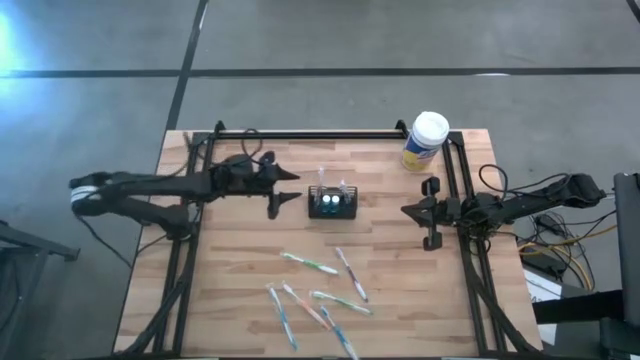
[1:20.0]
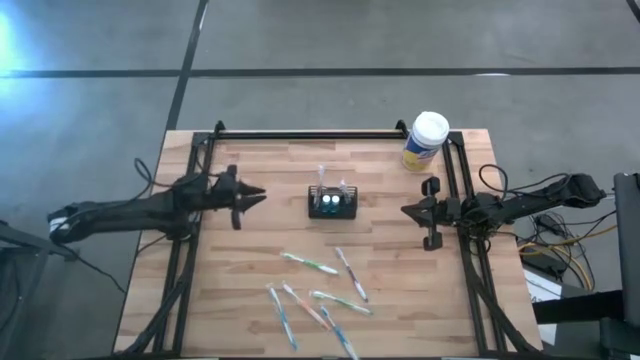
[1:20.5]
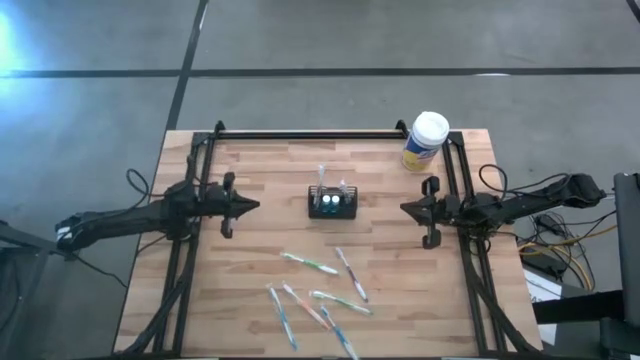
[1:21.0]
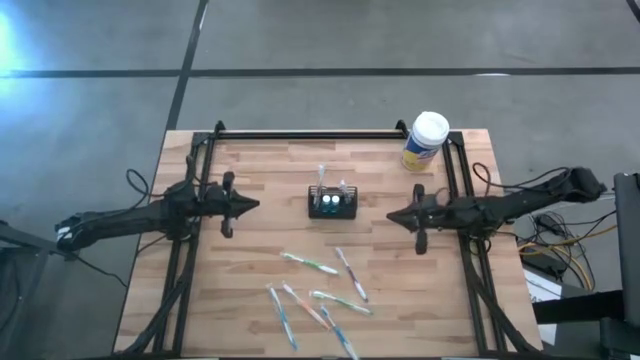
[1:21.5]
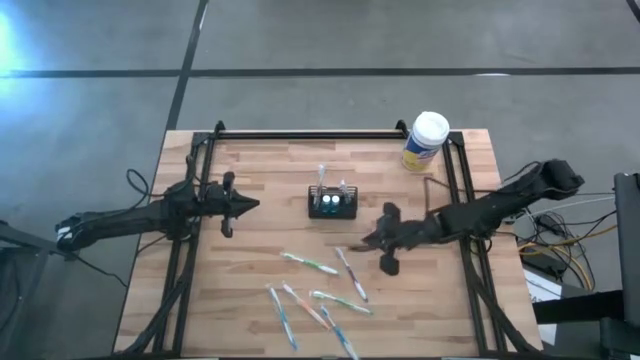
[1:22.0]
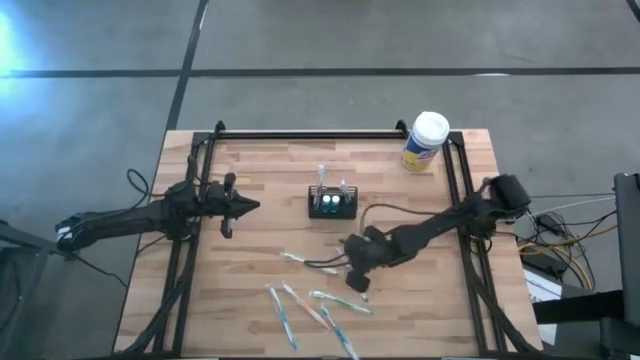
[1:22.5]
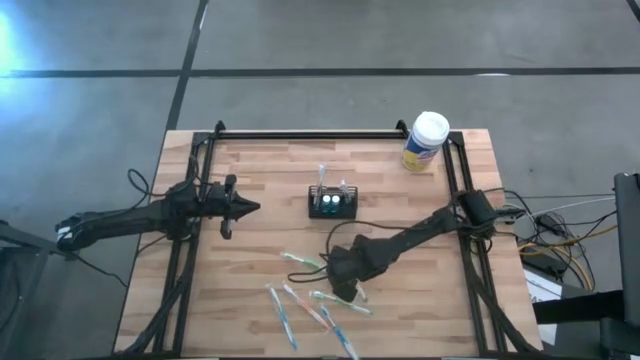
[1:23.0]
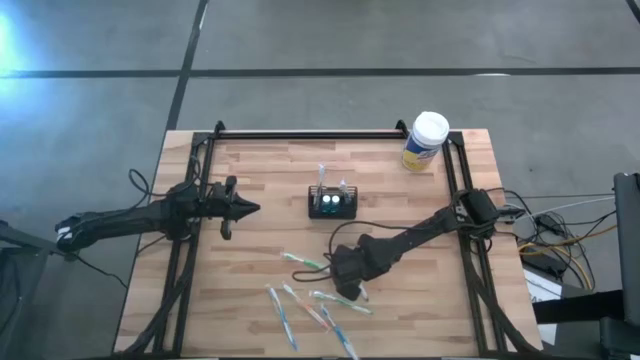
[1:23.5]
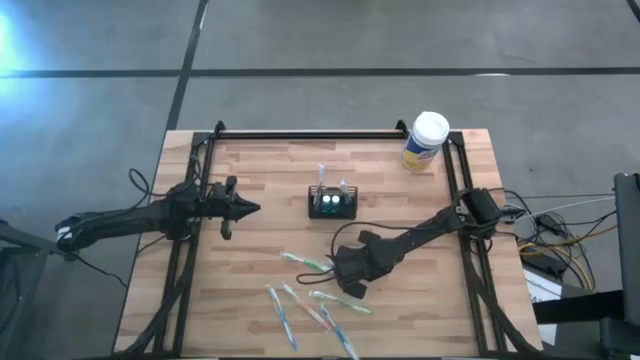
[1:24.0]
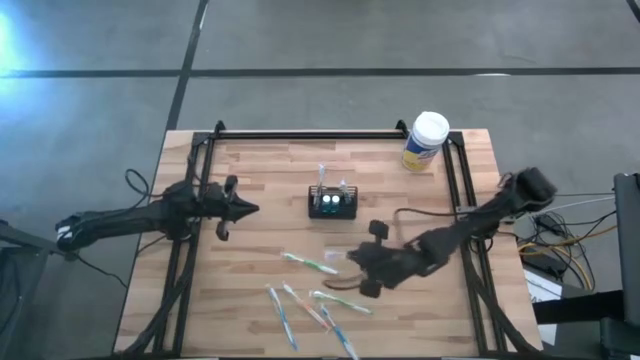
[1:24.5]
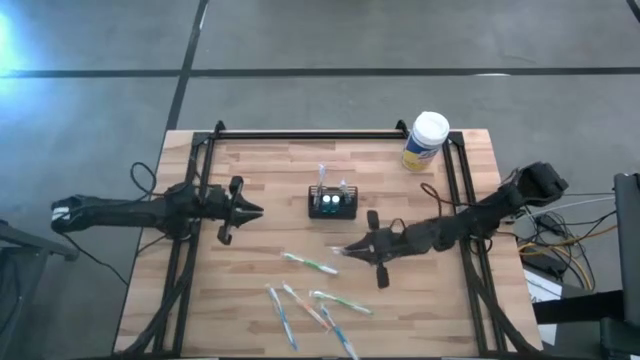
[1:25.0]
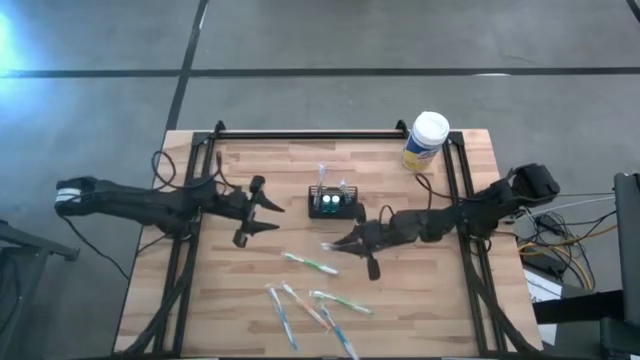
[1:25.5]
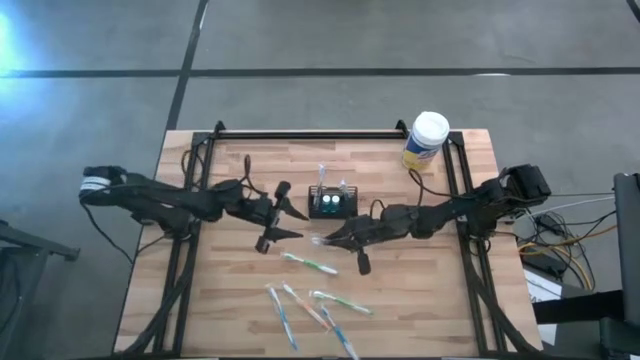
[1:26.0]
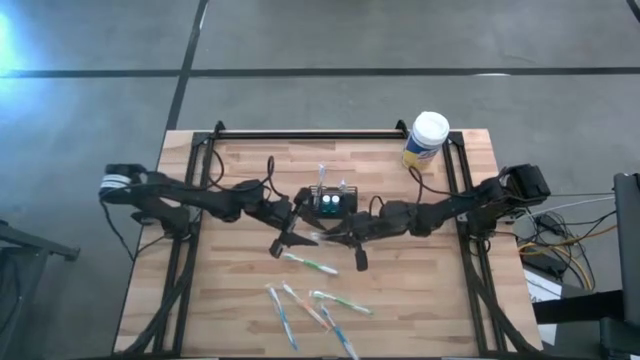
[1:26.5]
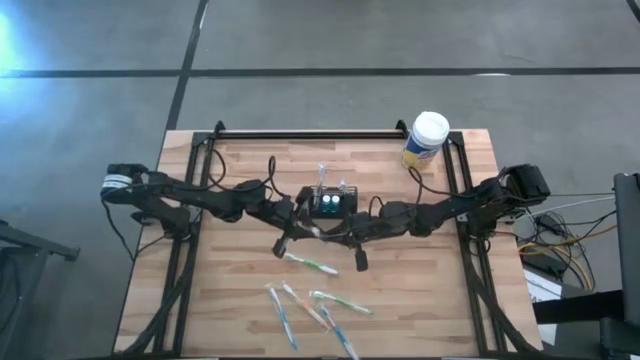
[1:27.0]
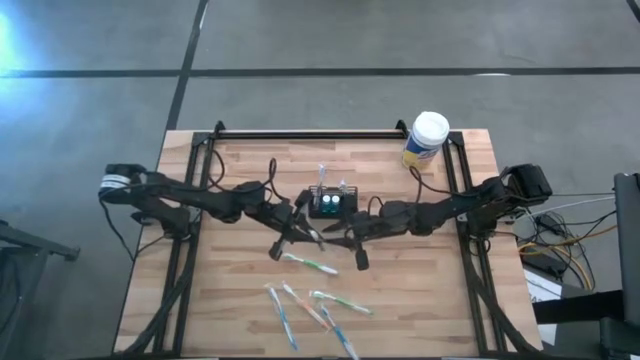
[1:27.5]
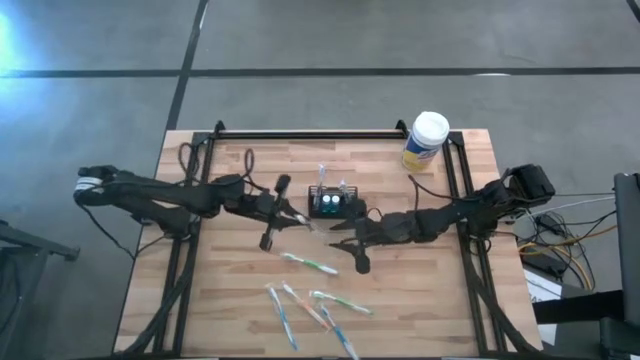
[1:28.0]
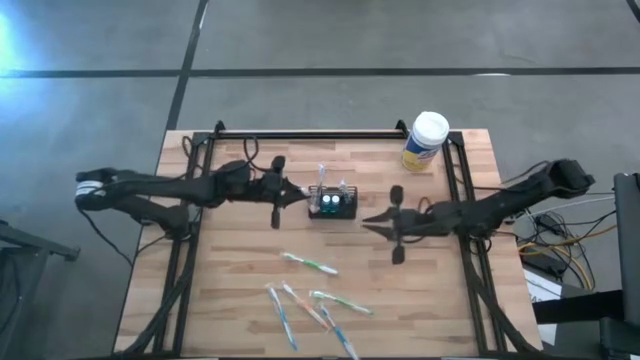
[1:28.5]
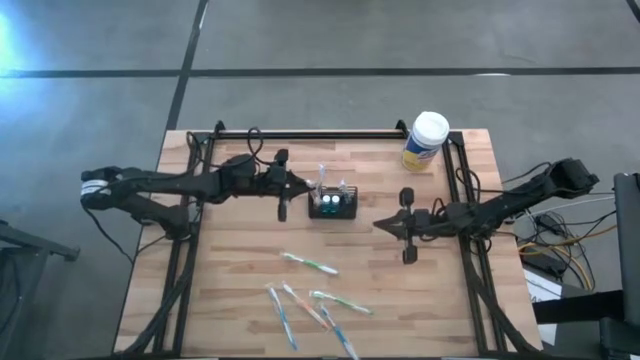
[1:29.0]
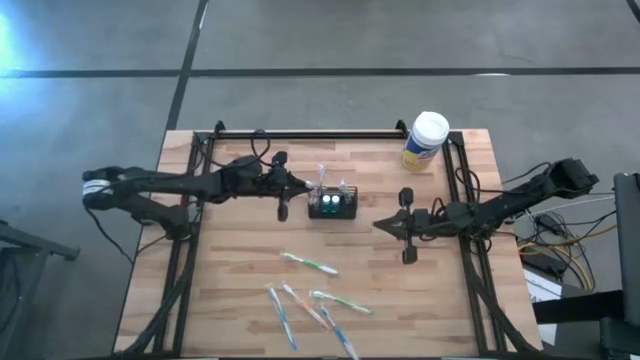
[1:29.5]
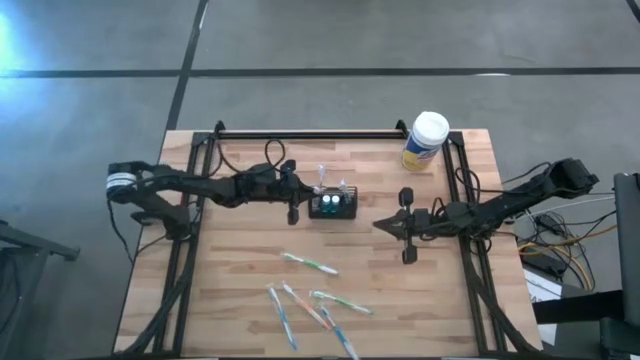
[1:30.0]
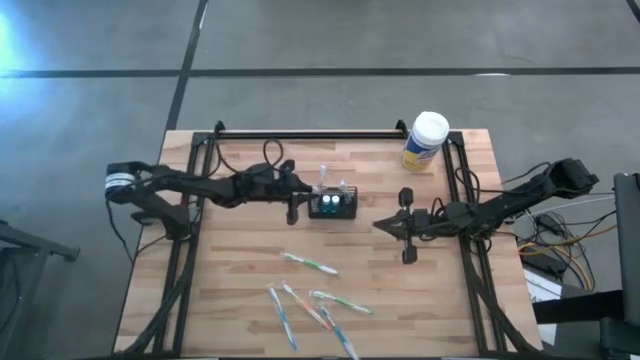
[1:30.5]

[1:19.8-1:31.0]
Task: Pick & Place toothbrushing station
Put the purple toothbrush into the black organizer

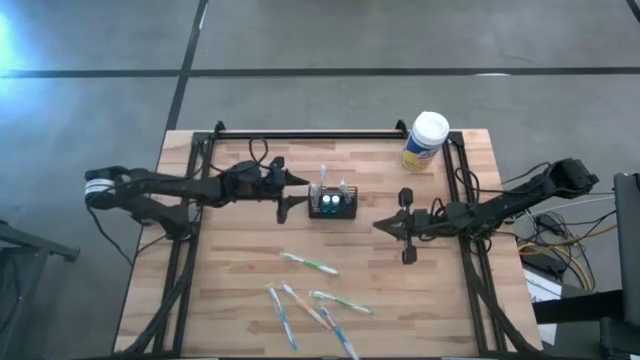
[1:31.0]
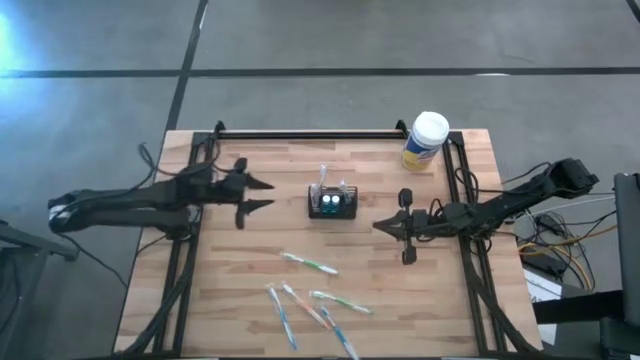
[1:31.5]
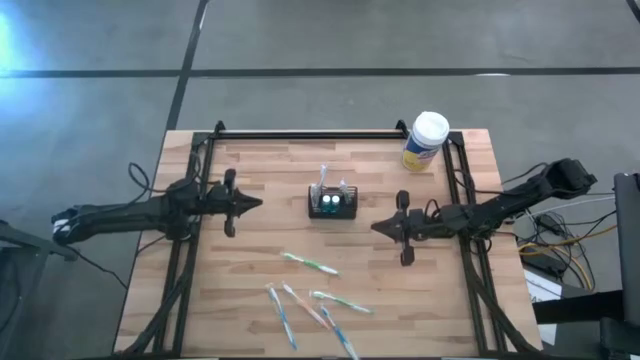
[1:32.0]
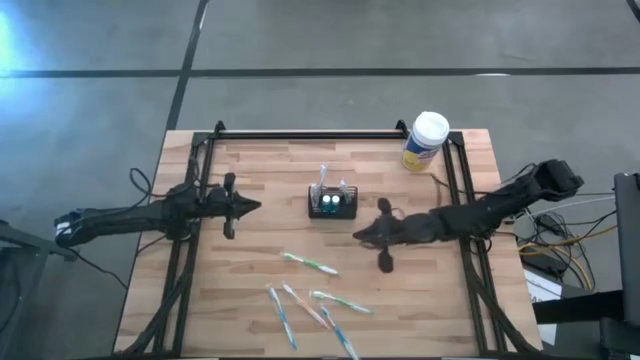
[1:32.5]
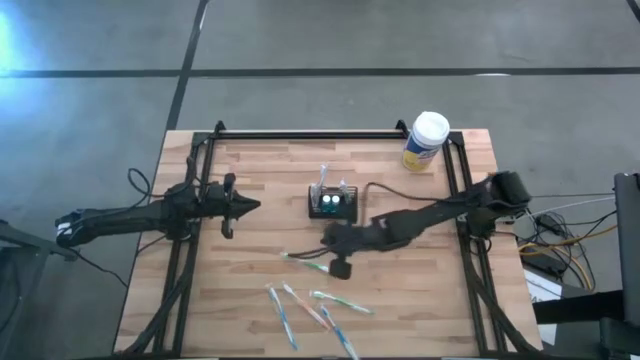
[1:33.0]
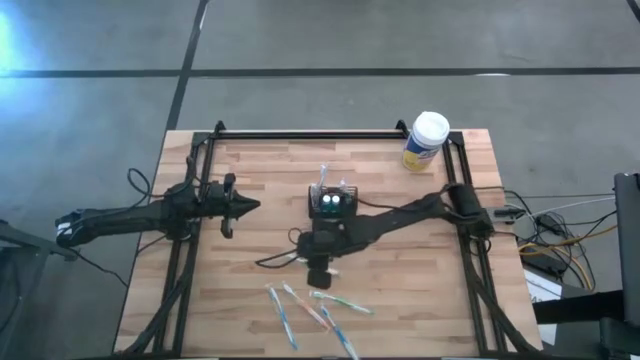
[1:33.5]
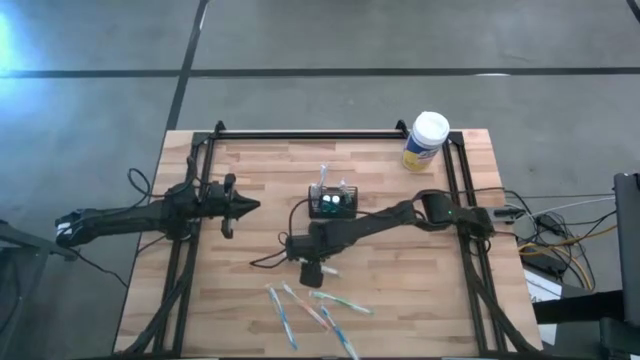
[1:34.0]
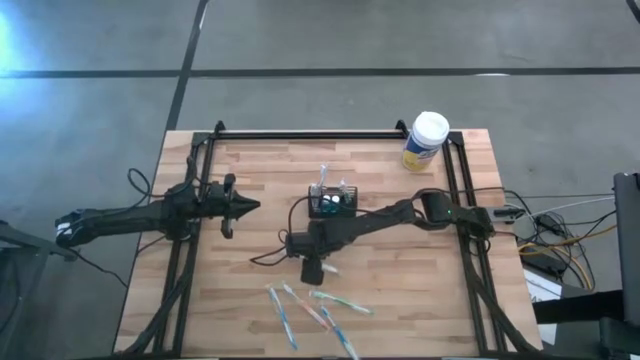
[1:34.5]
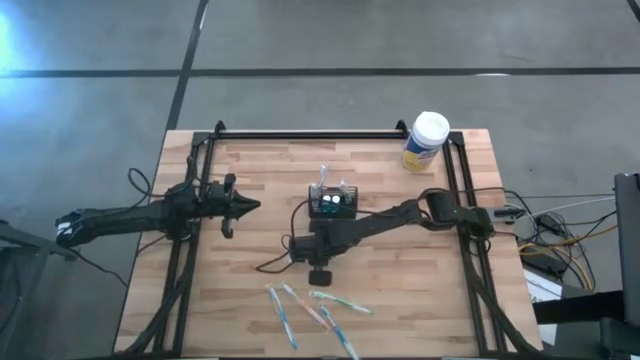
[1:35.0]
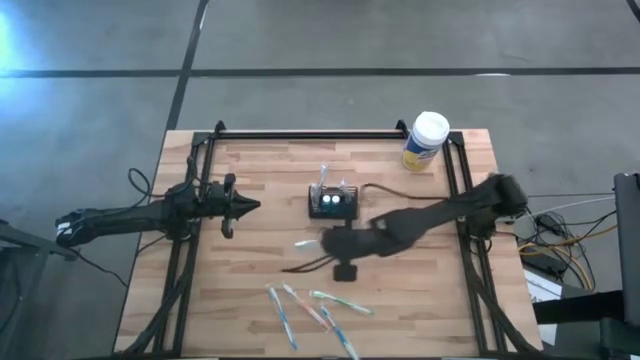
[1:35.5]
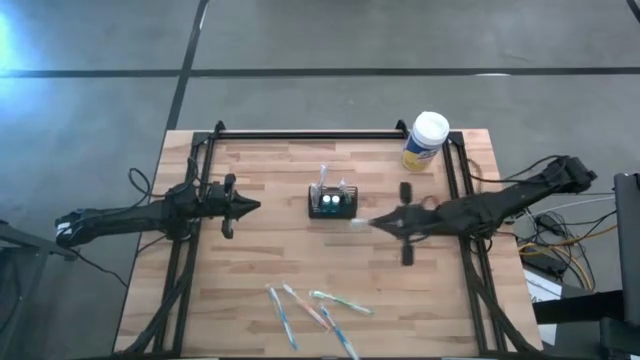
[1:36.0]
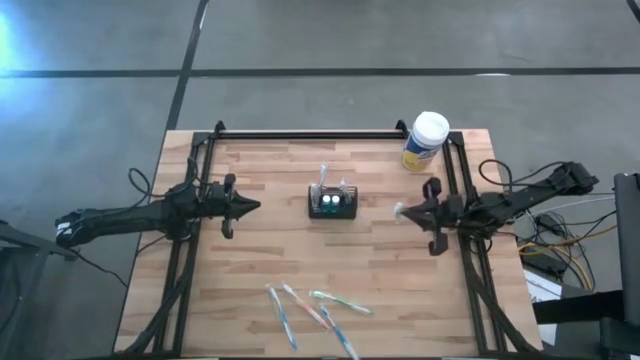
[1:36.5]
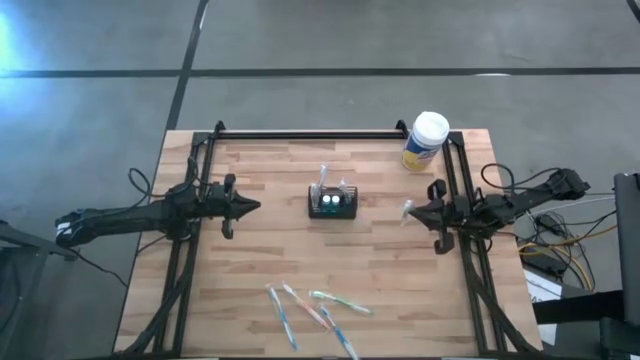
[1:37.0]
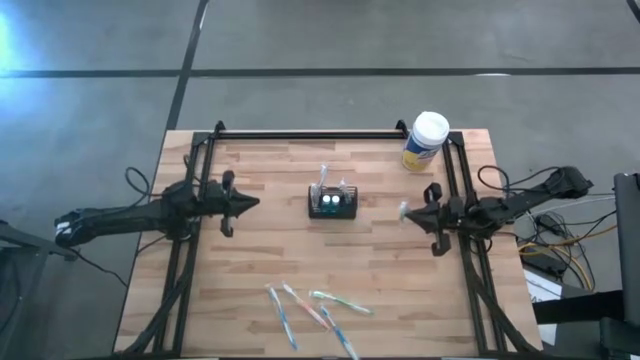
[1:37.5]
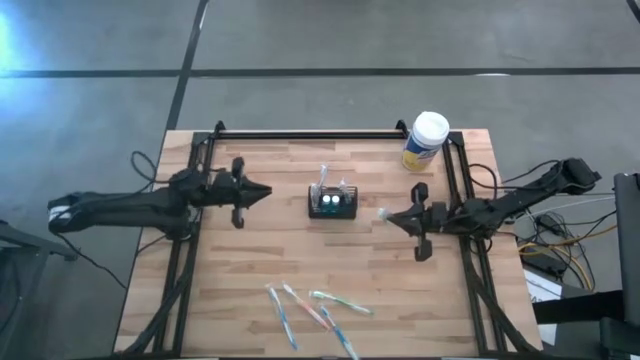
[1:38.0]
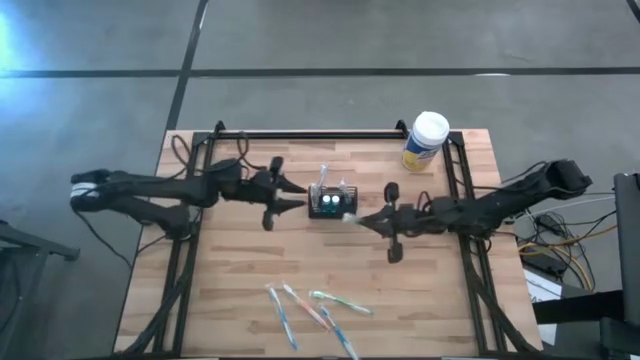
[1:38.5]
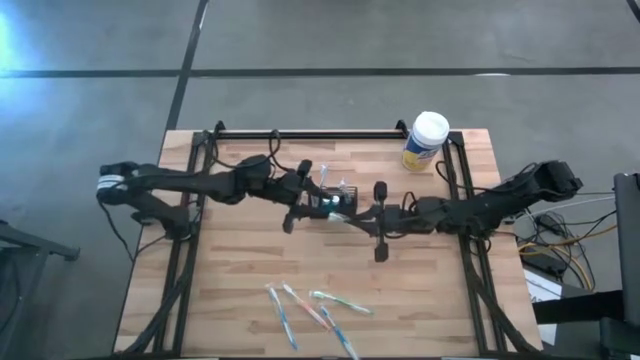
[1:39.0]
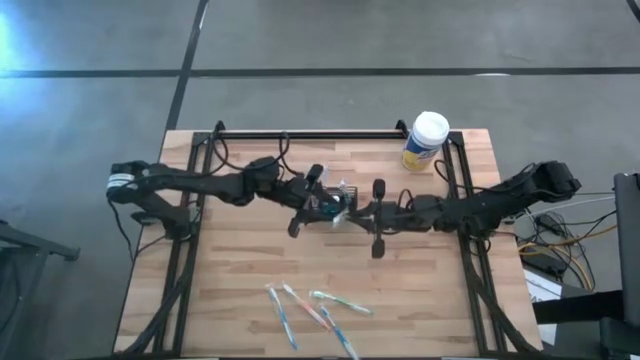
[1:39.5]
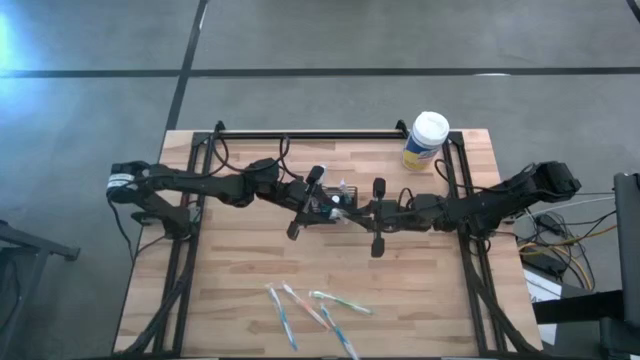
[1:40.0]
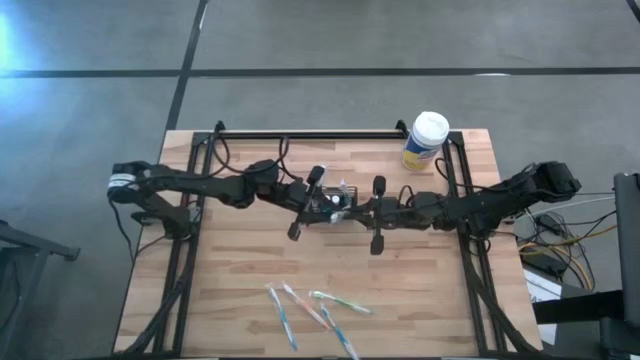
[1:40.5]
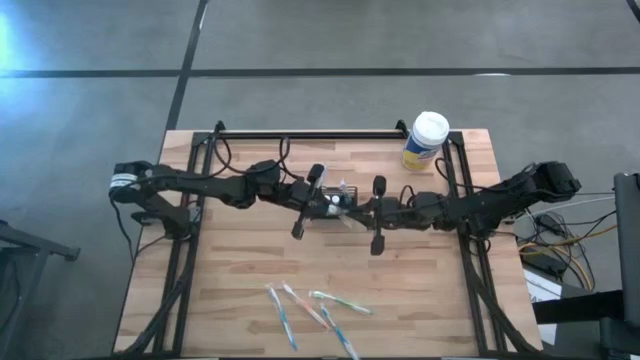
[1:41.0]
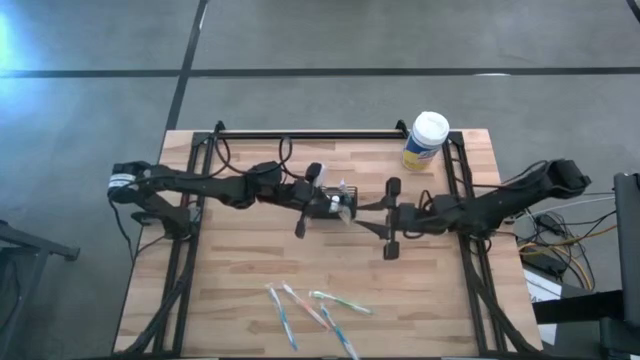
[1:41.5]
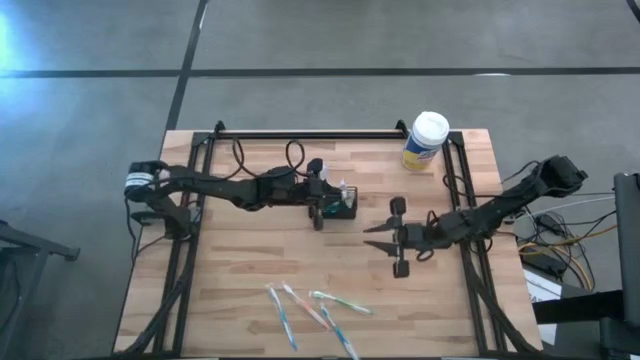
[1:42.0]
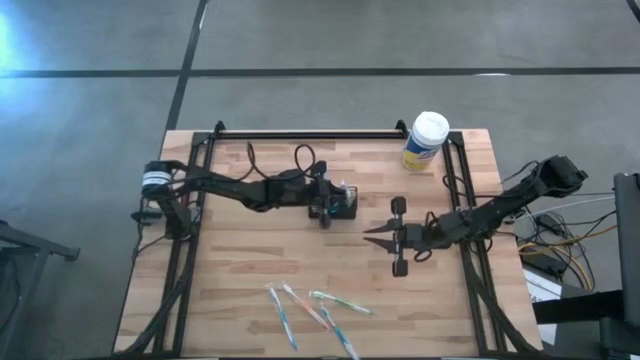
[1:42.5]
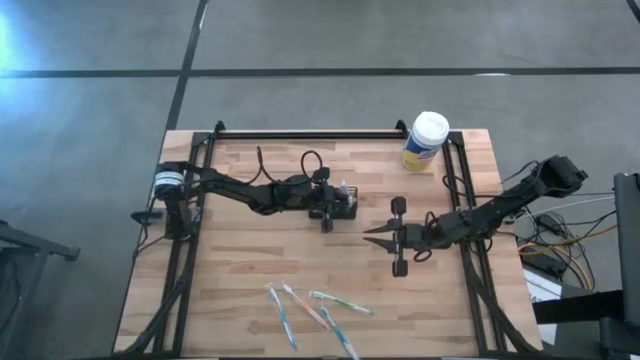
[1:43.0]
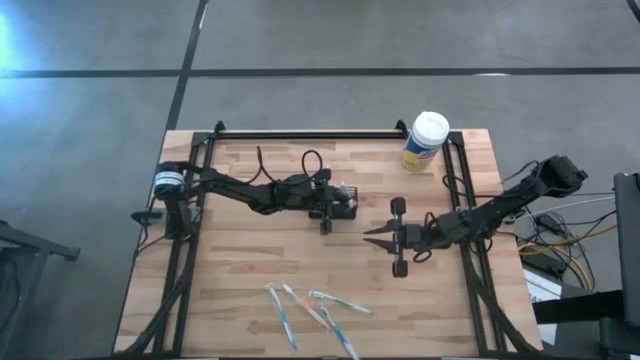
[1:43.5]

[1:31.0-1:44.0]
Put the top green toothbrush into the black organizer
